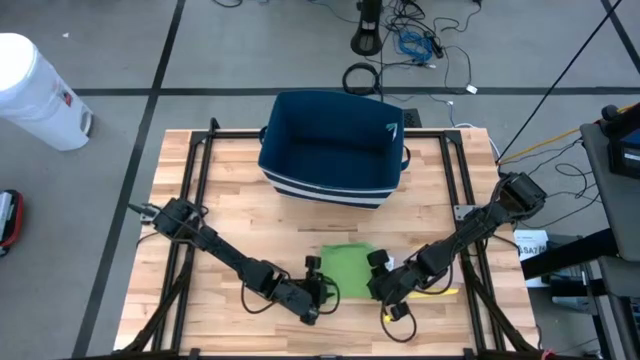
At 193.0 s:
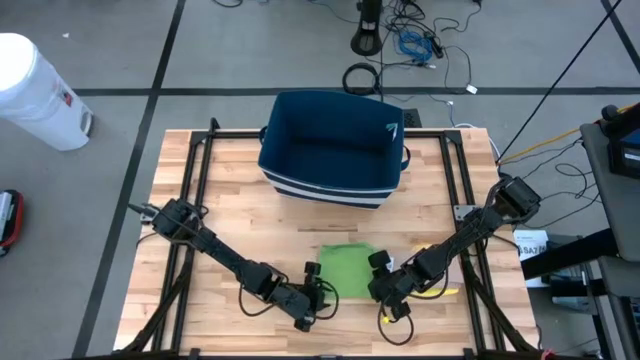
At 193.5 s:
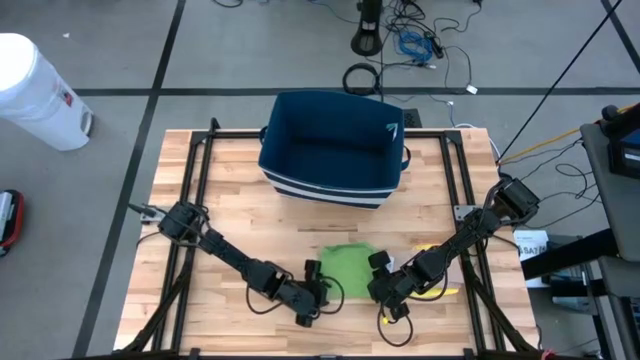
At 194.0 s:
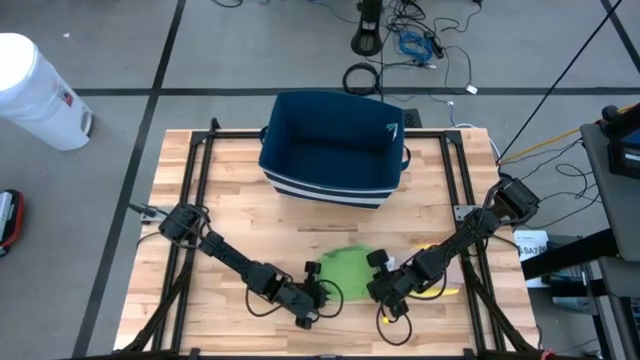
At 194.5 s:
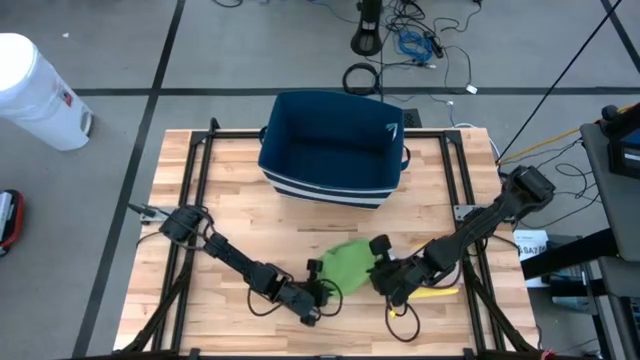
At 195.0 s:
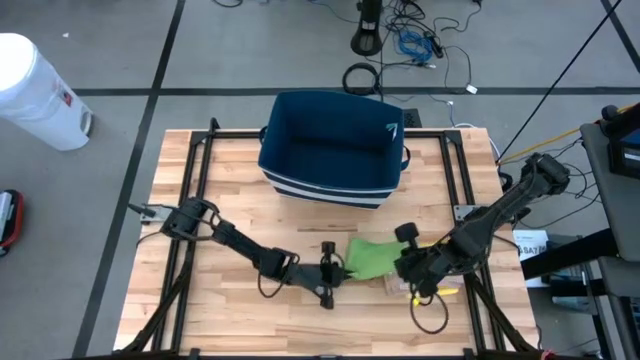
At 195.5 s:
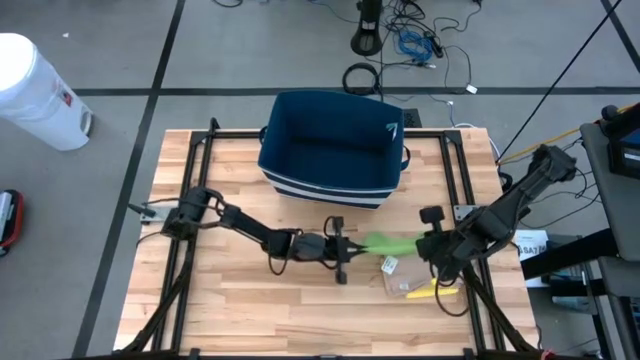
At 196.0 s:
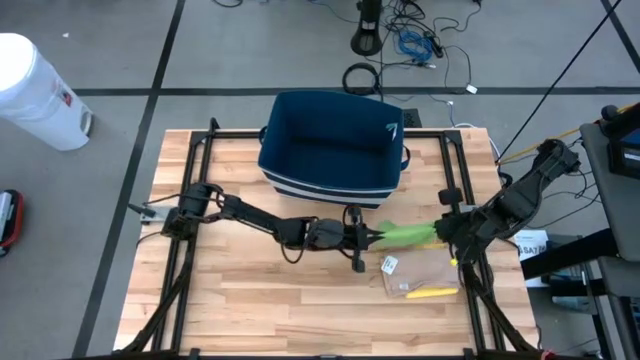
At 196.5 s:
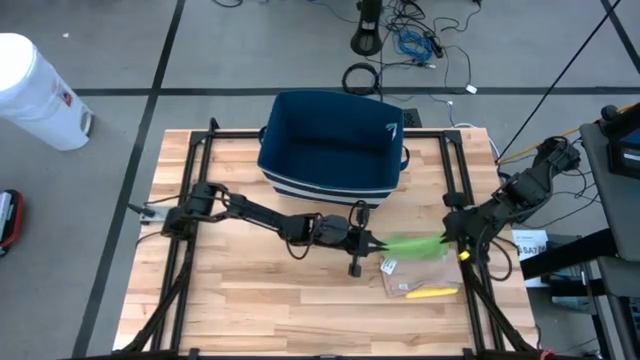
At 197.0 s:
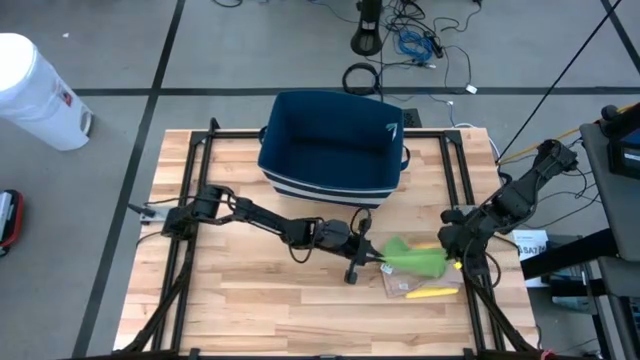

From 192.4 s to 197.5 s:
Task: Fold towel
Stack the folded green towel on the folded brown towel

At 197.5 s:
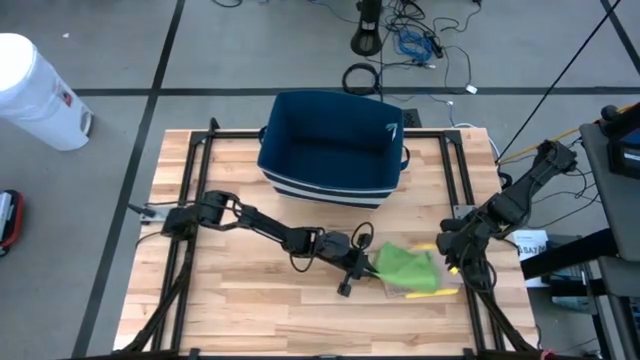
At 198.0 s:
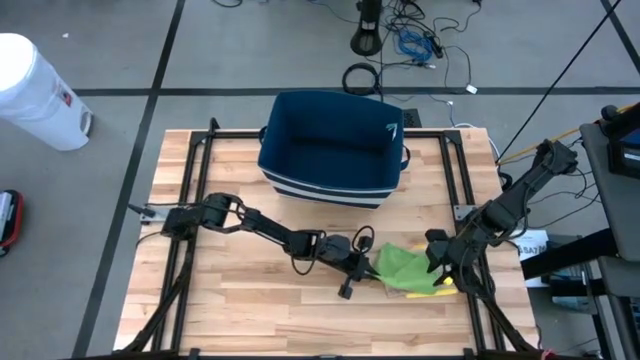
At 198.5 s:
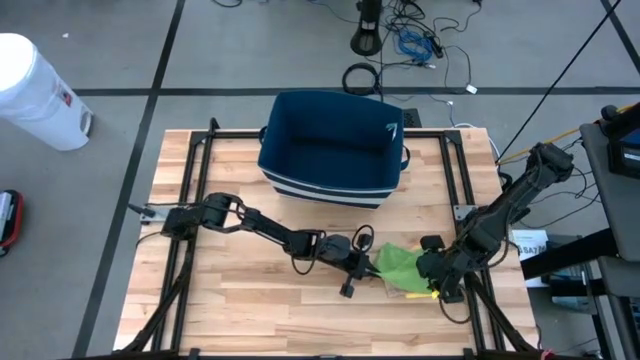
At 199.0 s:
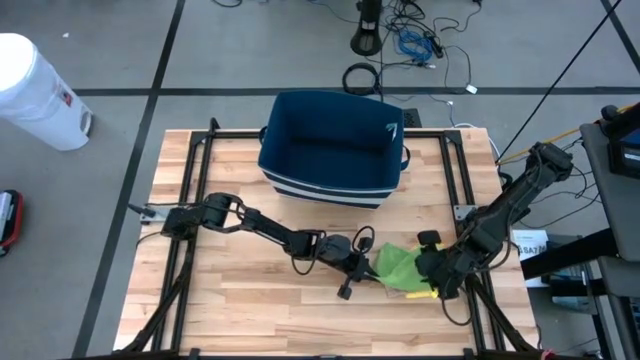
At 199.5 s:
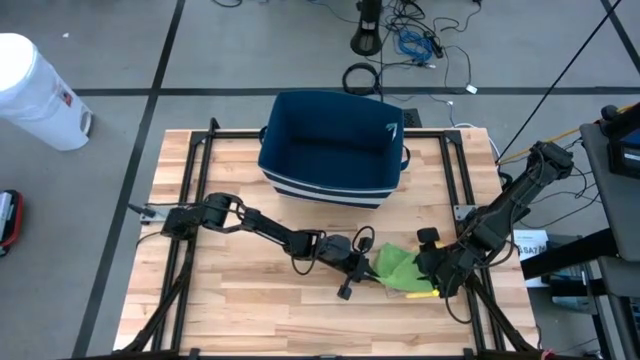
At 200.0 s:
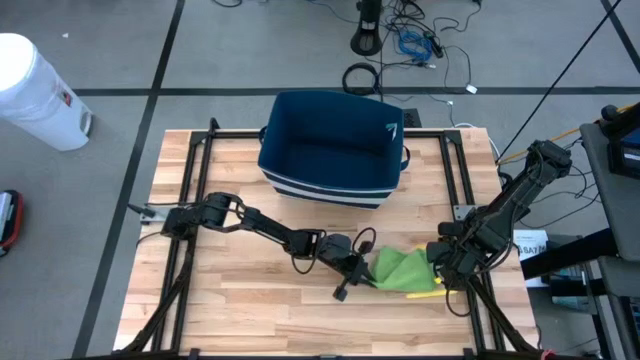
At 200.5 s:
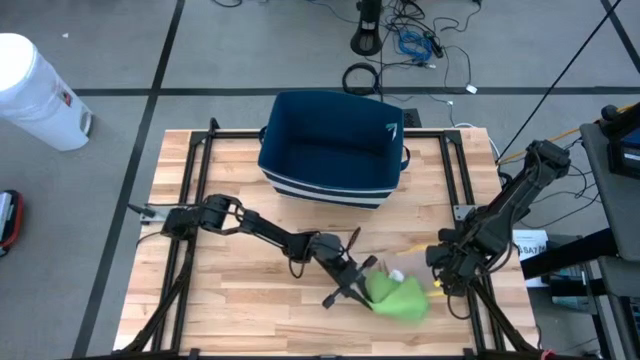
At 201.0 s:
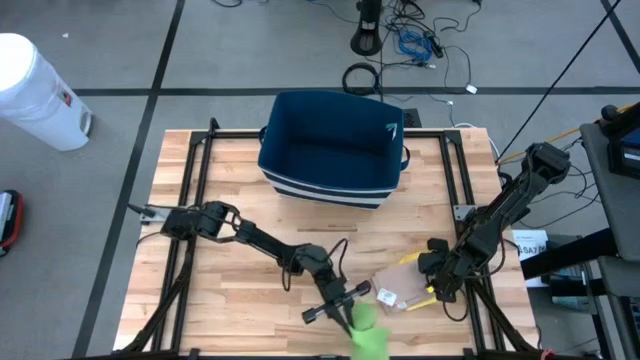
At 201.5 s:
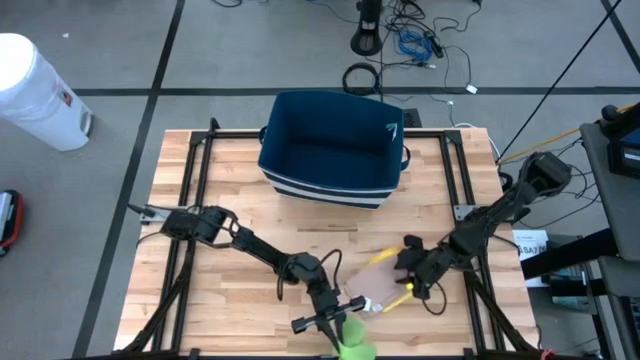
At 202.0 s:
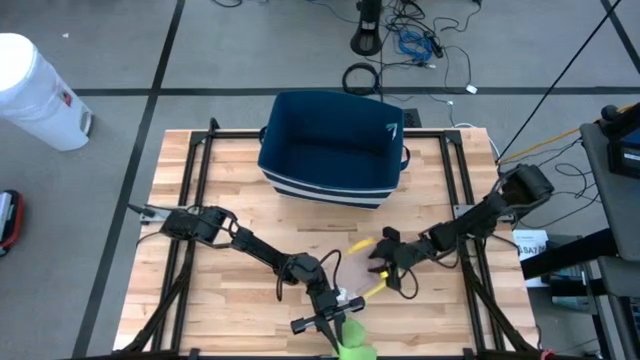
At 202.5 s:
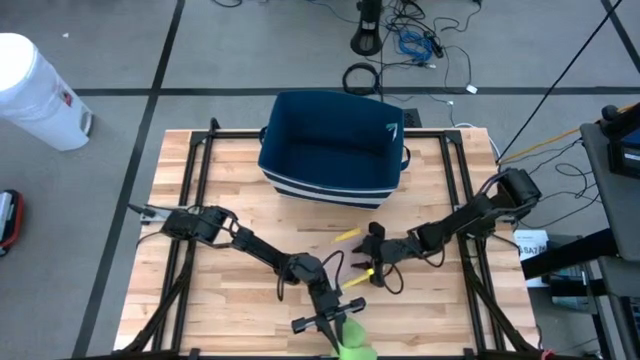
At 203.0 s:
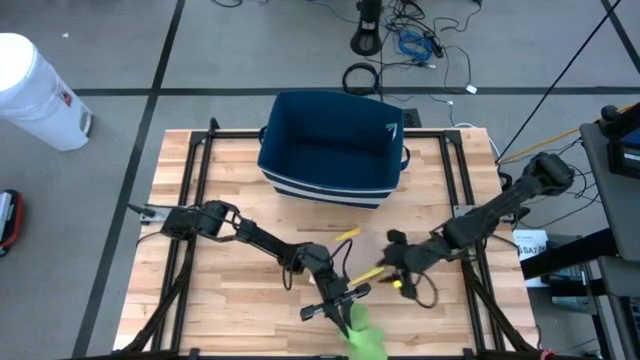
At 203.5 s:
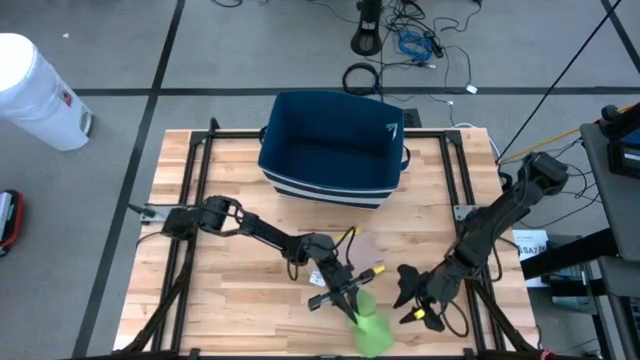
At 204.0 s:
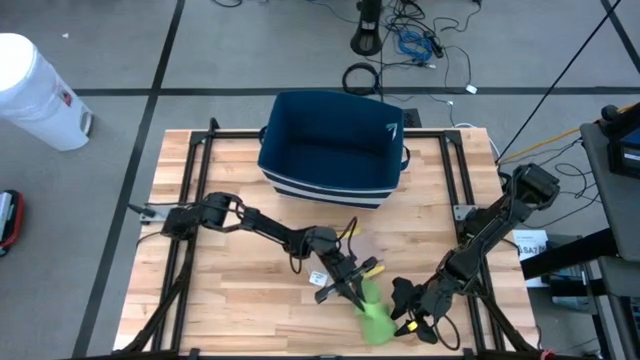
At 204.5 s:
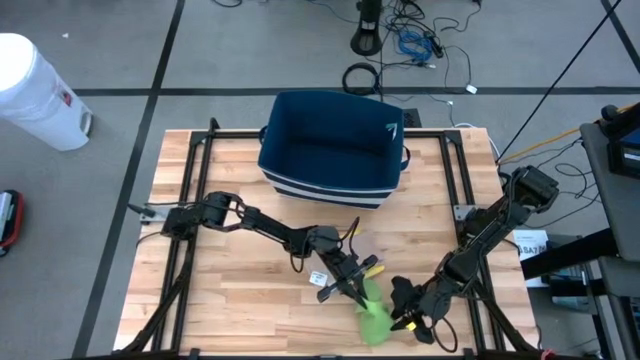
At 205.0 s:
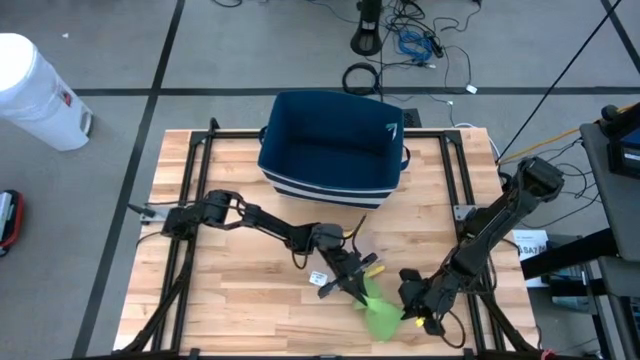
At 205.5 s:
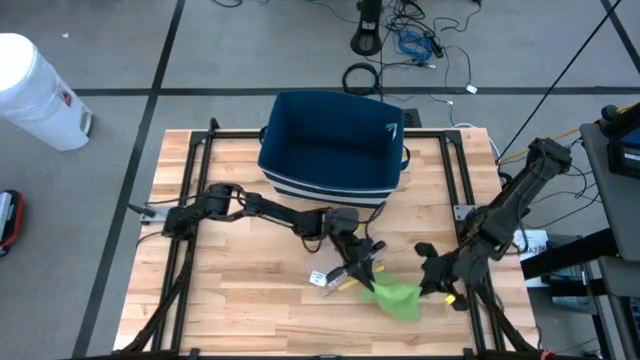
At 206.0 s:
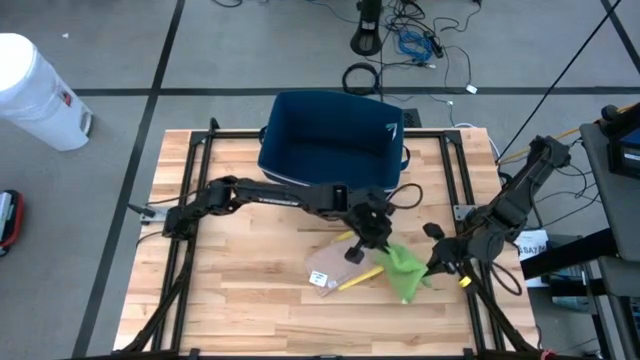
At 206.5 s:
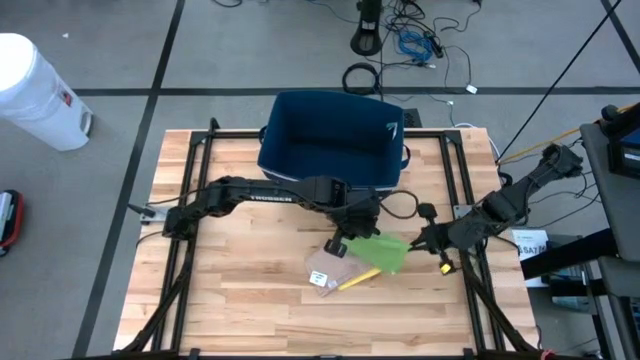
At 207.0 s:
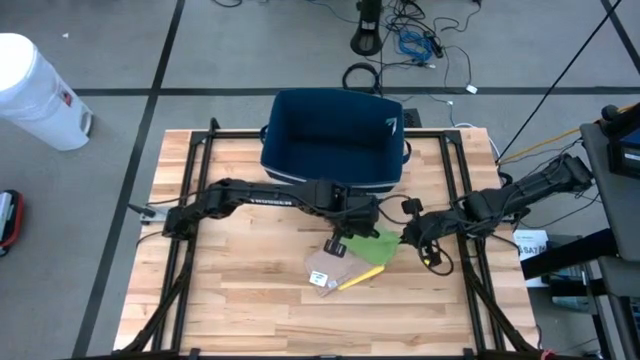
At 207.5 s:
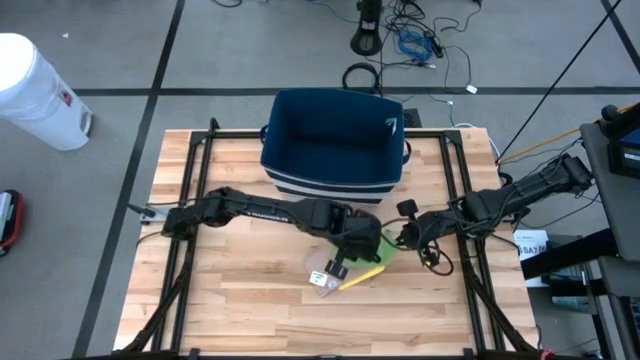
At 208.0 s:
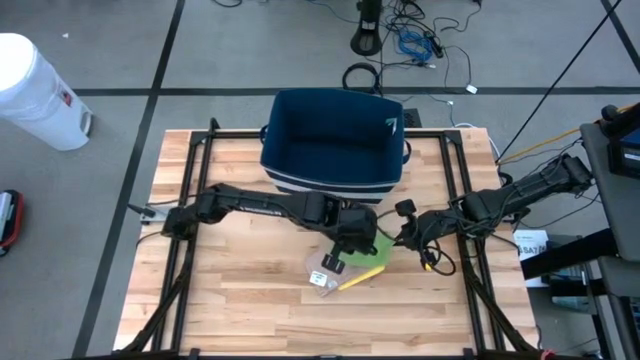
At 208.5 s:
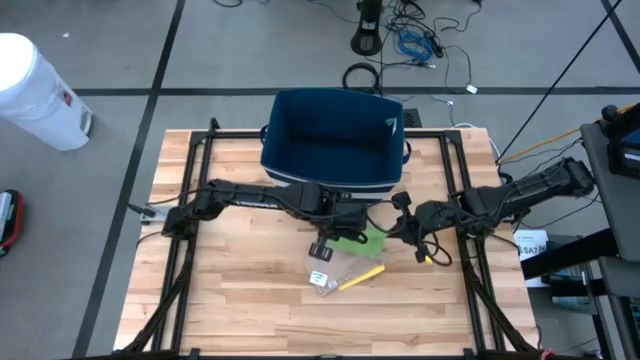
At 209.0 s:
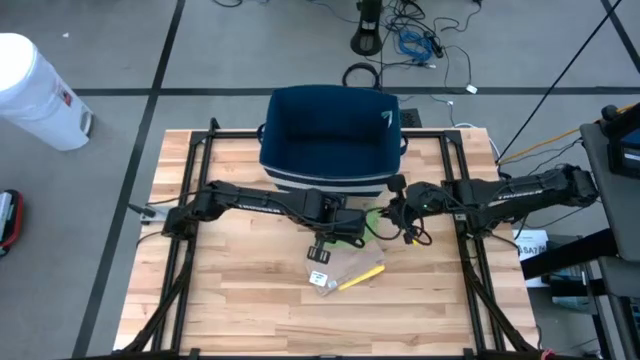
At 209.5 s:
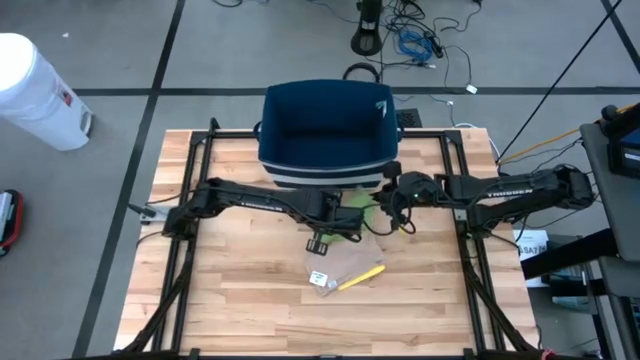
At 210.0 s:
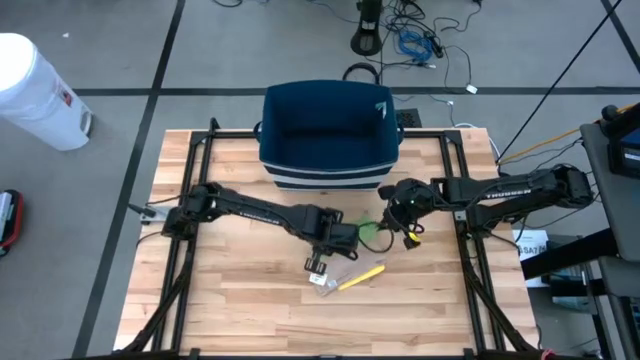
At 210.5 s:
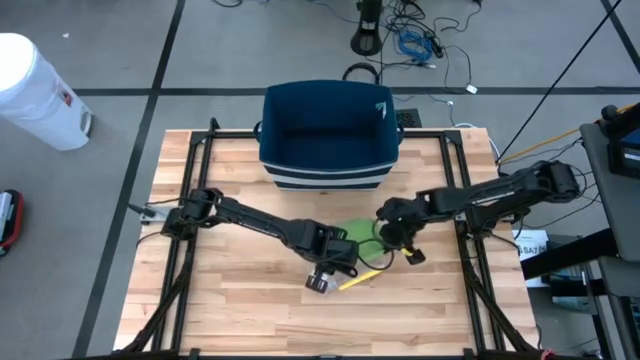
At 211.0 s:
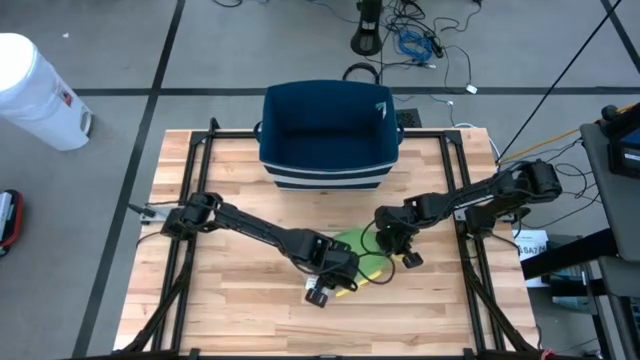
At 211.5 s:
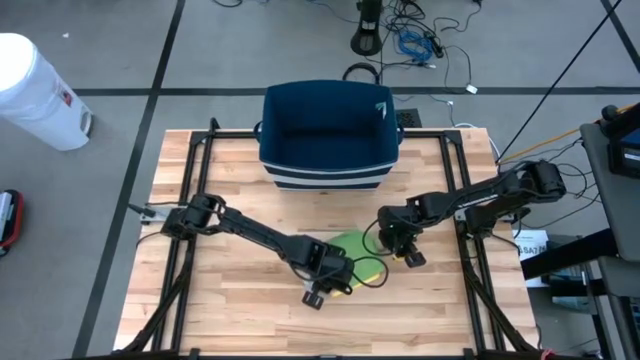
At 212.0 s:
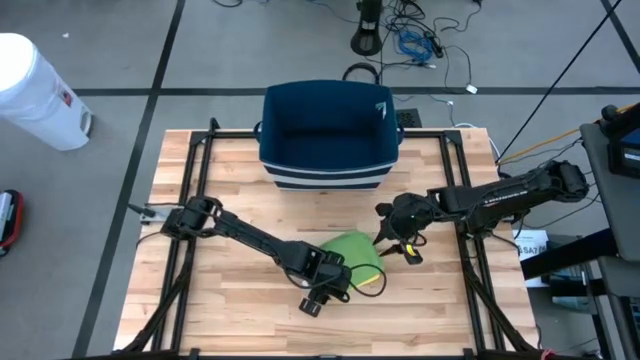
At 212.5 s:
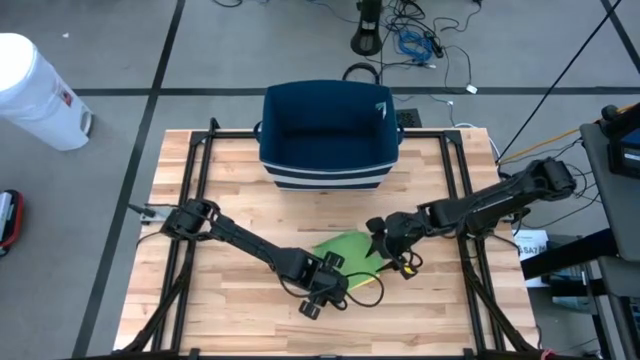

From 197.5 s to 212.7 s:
Stack the folded green towel on the folded brown towel

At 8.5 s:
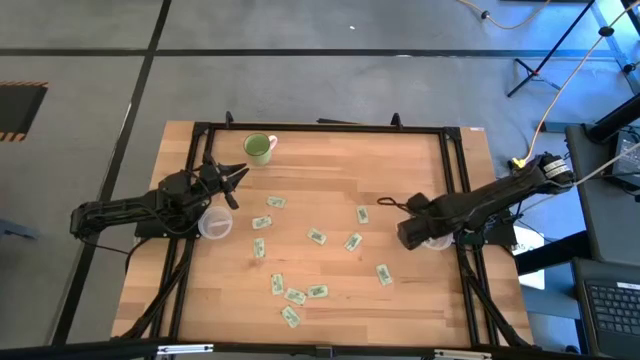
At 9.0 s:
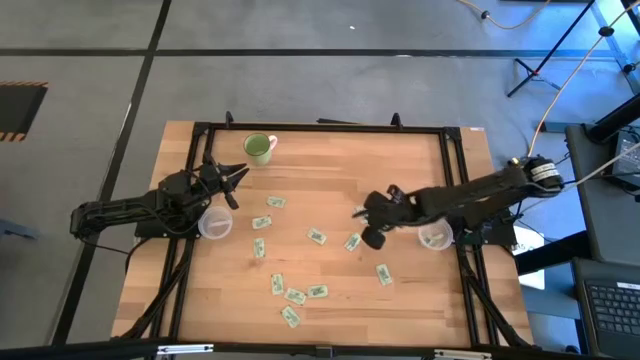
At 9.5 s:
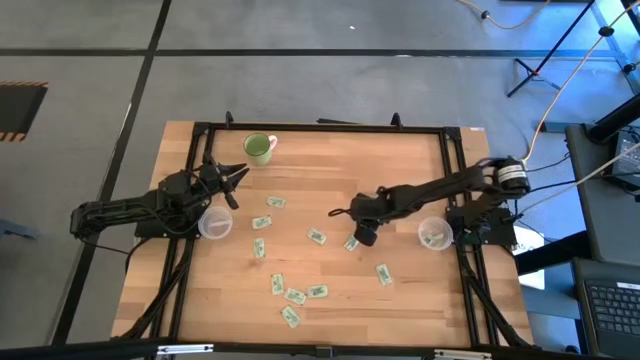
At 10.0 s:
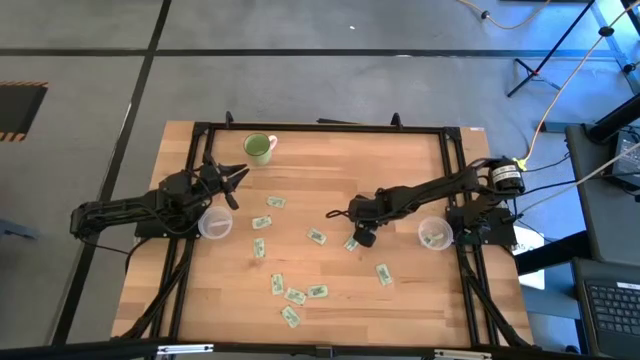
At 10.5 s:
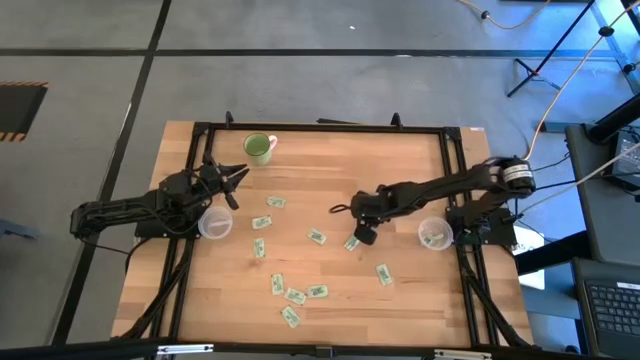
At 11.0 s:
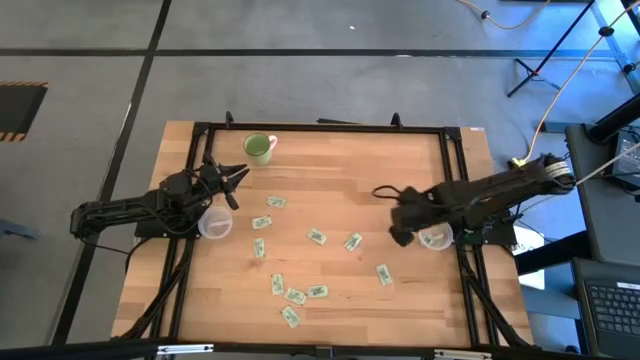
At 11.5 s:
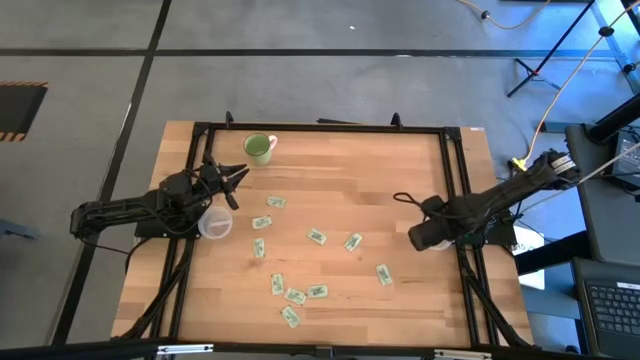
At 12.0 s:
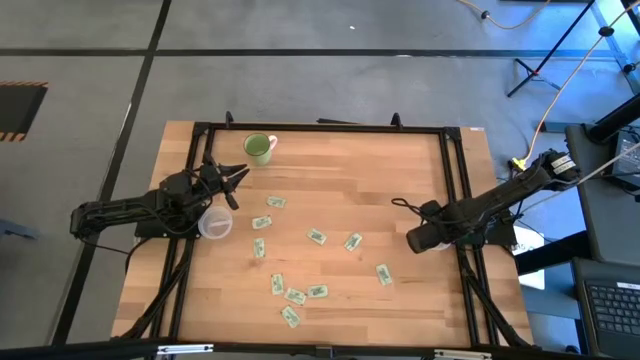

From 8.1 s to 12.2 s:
Task: Pick and place items into bin
Put the white stevia packet into the right transparent bin
